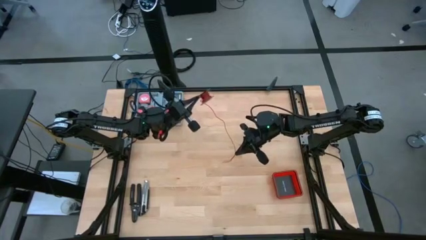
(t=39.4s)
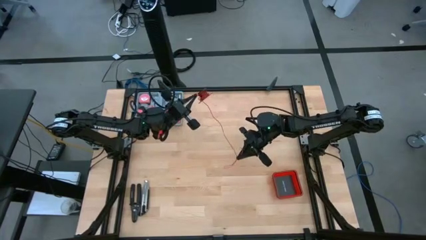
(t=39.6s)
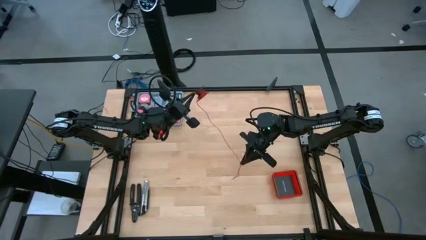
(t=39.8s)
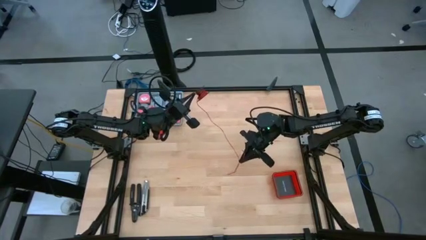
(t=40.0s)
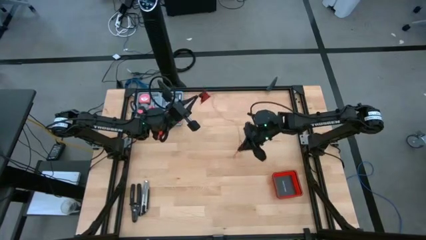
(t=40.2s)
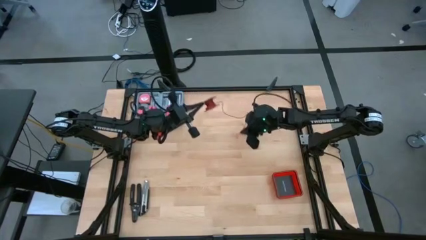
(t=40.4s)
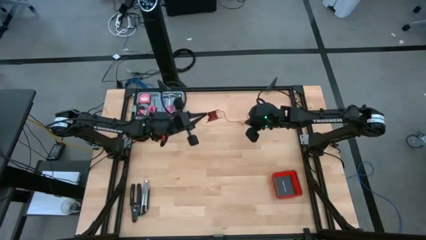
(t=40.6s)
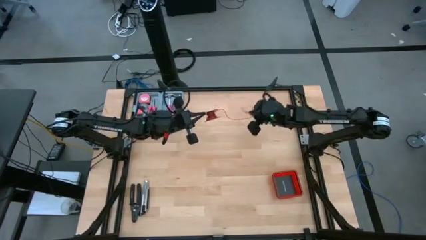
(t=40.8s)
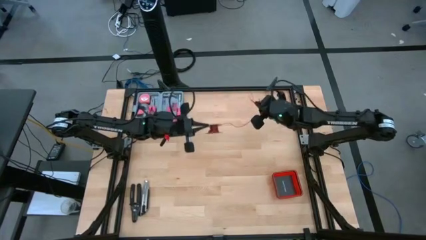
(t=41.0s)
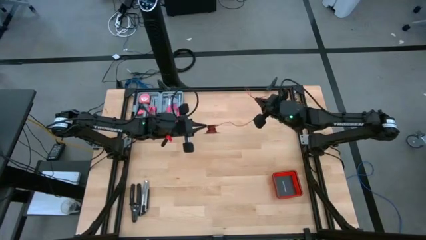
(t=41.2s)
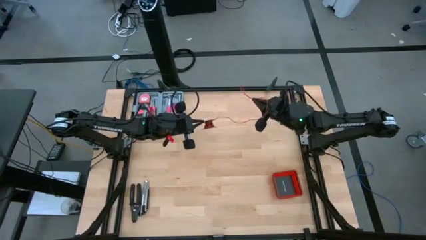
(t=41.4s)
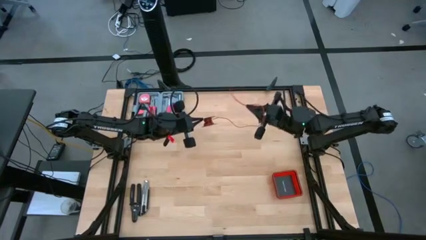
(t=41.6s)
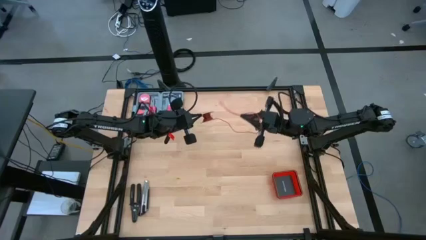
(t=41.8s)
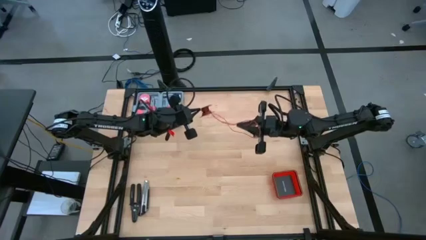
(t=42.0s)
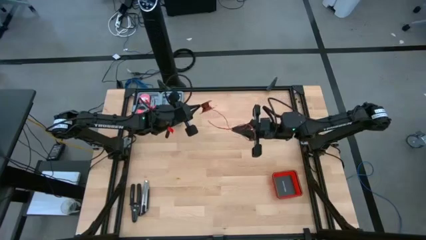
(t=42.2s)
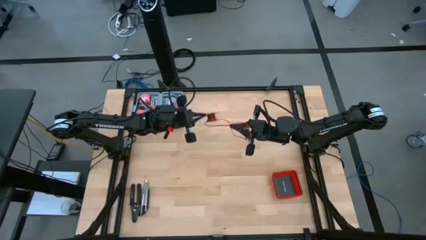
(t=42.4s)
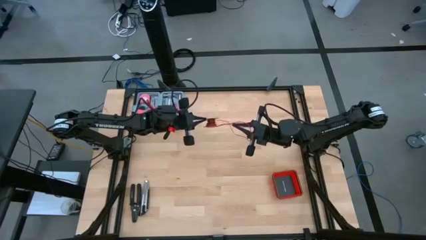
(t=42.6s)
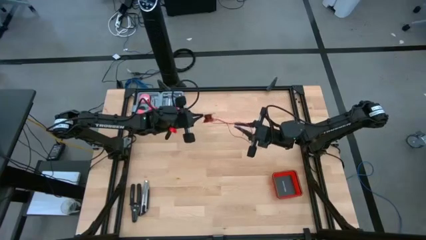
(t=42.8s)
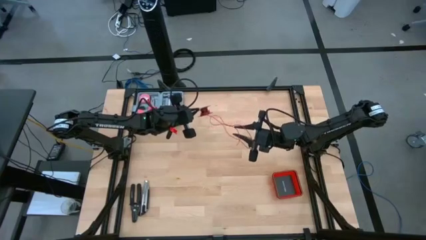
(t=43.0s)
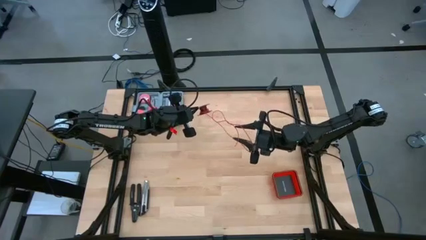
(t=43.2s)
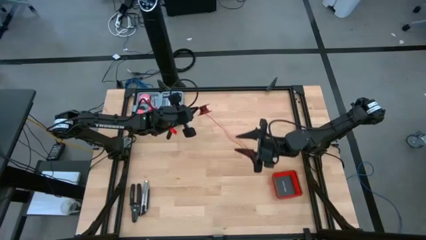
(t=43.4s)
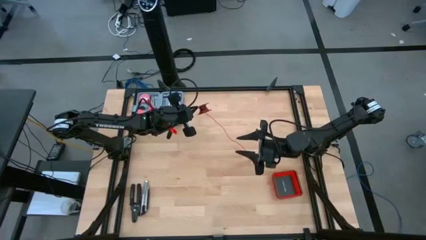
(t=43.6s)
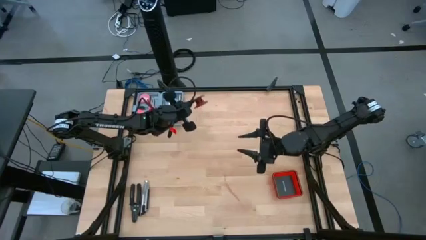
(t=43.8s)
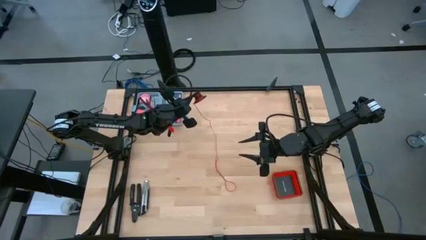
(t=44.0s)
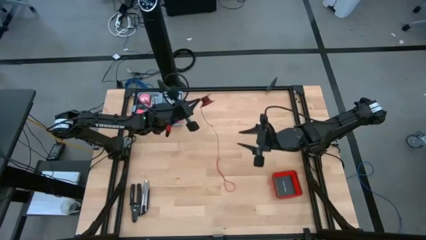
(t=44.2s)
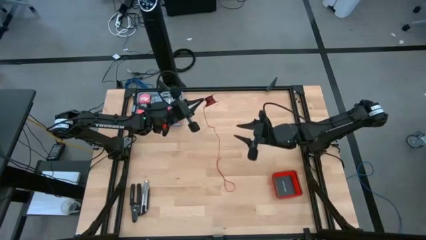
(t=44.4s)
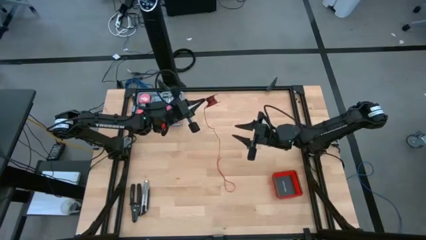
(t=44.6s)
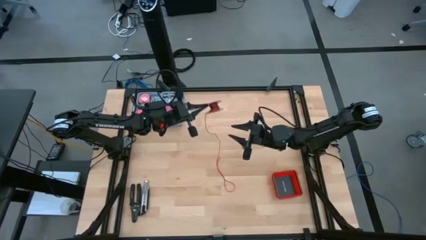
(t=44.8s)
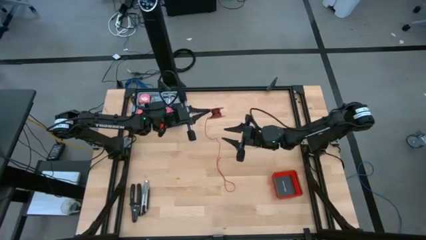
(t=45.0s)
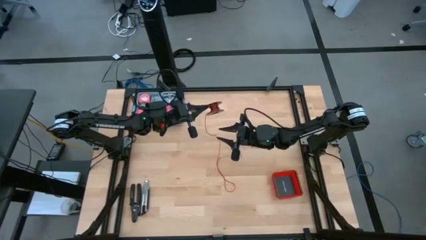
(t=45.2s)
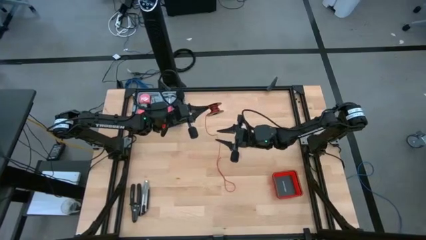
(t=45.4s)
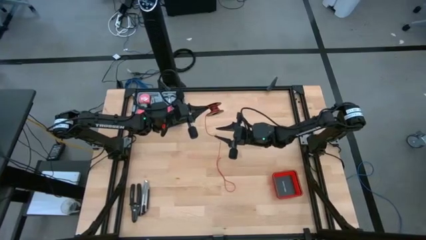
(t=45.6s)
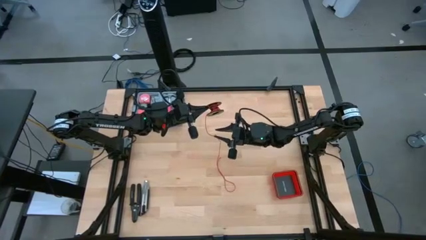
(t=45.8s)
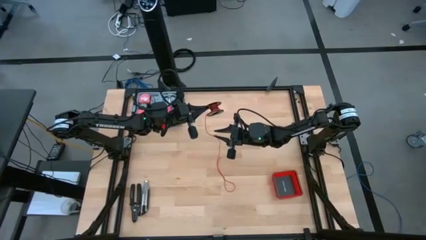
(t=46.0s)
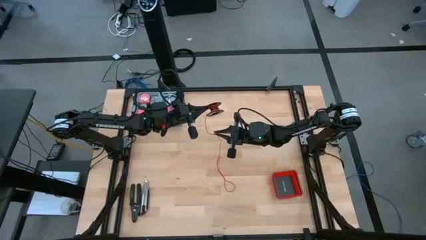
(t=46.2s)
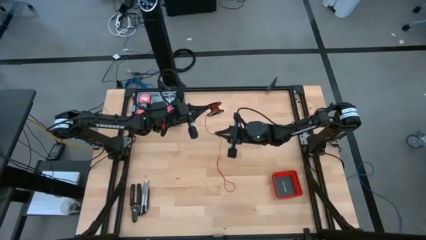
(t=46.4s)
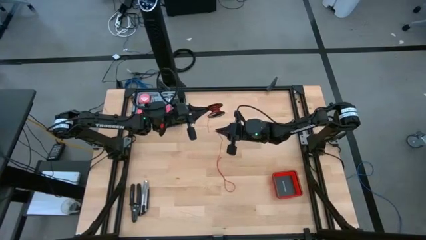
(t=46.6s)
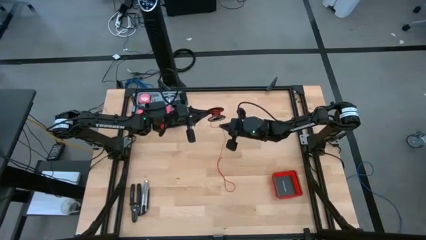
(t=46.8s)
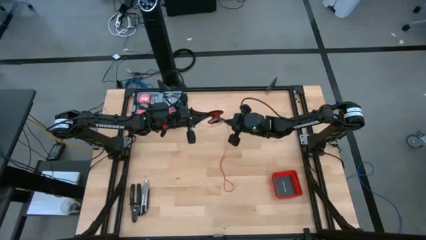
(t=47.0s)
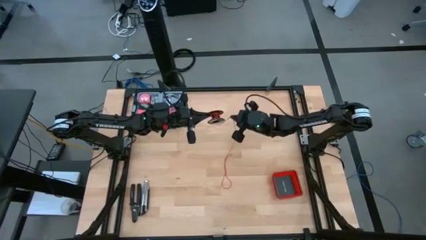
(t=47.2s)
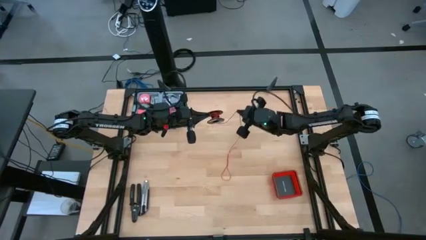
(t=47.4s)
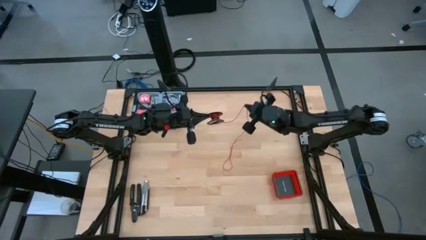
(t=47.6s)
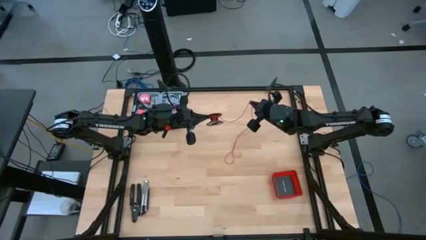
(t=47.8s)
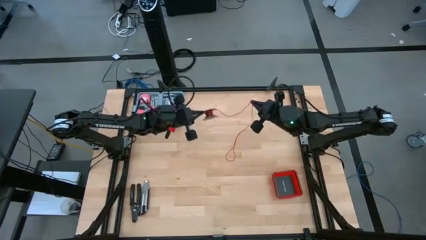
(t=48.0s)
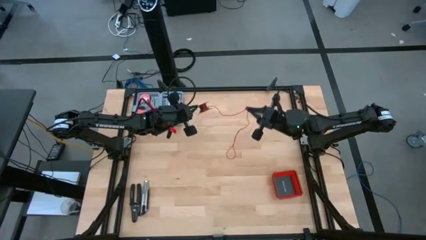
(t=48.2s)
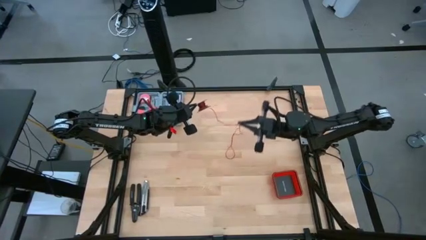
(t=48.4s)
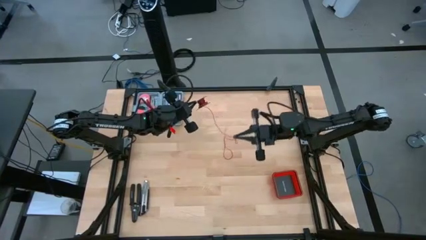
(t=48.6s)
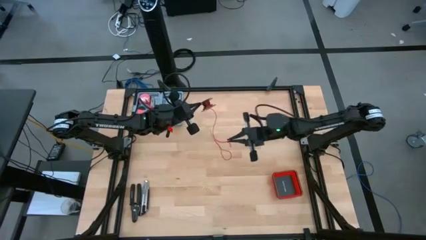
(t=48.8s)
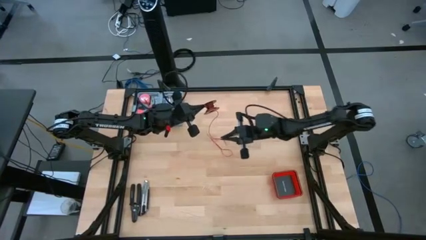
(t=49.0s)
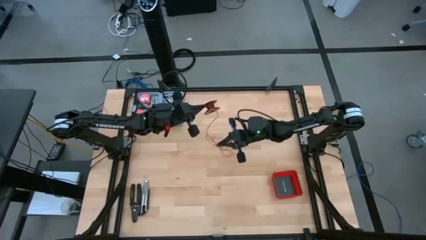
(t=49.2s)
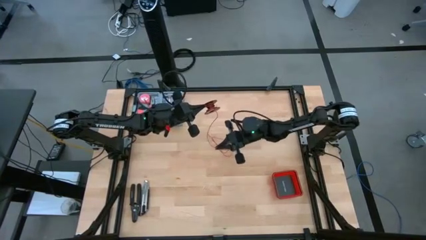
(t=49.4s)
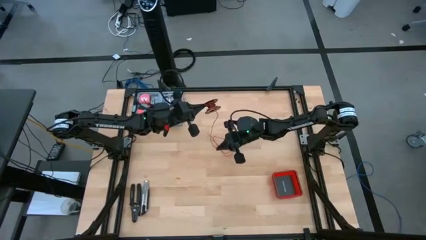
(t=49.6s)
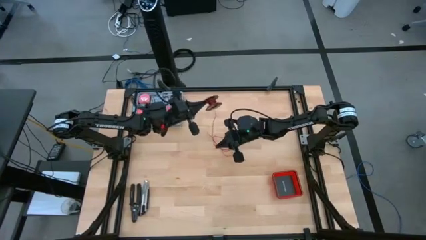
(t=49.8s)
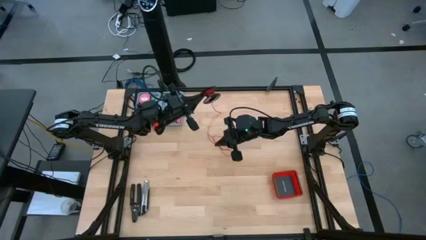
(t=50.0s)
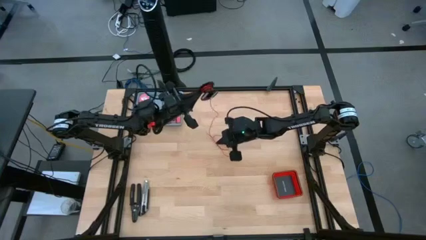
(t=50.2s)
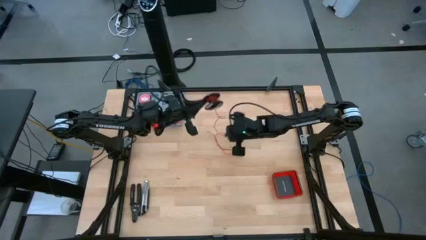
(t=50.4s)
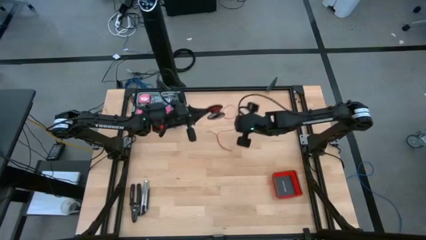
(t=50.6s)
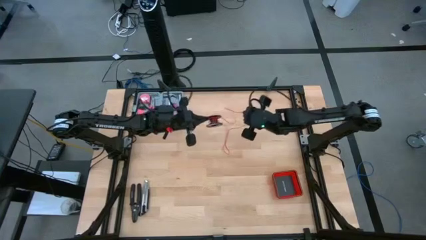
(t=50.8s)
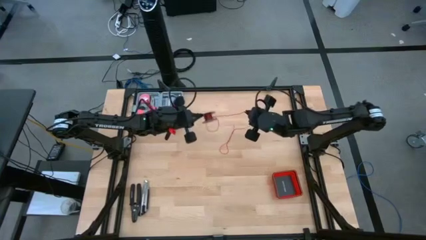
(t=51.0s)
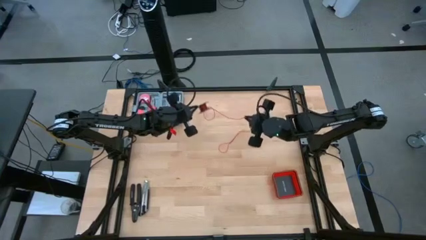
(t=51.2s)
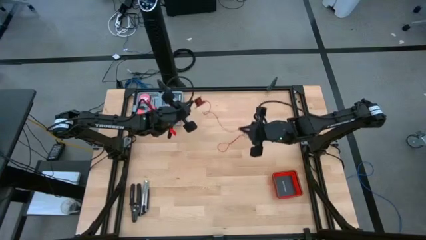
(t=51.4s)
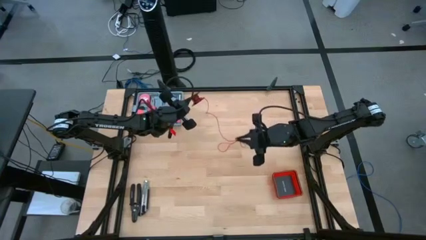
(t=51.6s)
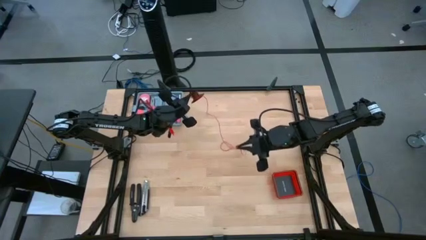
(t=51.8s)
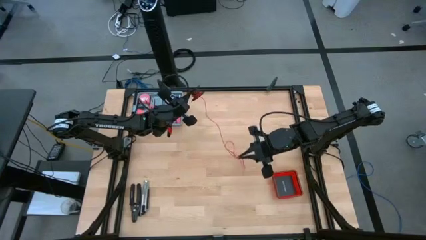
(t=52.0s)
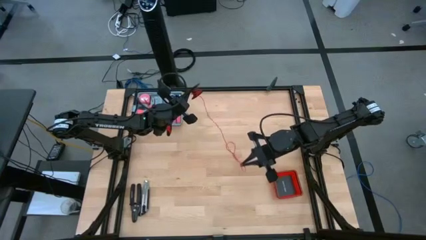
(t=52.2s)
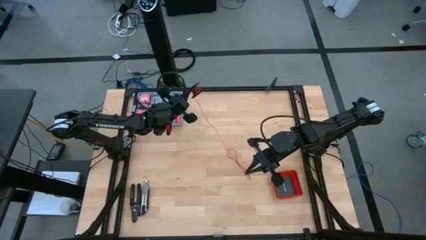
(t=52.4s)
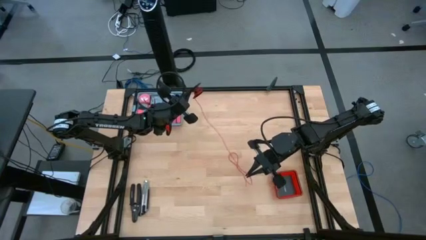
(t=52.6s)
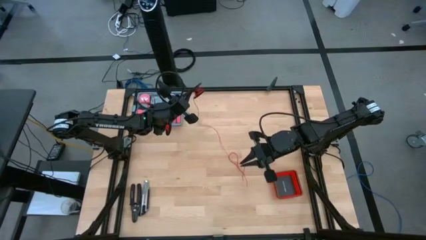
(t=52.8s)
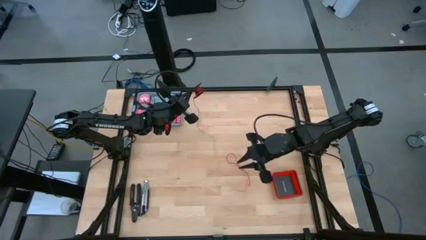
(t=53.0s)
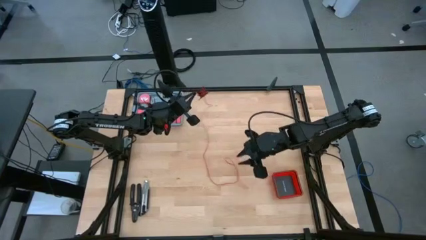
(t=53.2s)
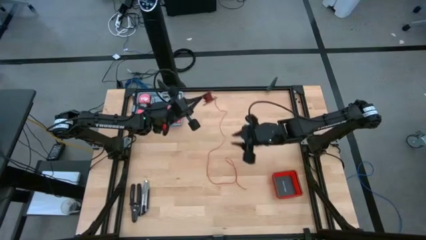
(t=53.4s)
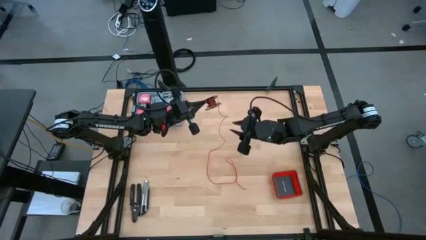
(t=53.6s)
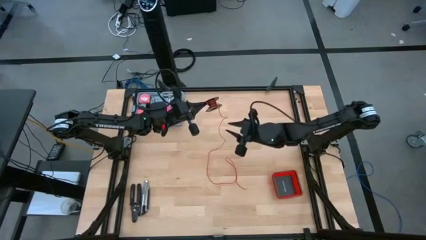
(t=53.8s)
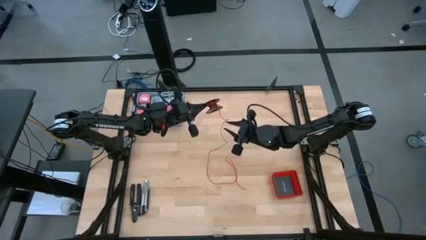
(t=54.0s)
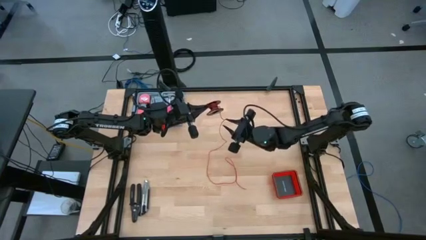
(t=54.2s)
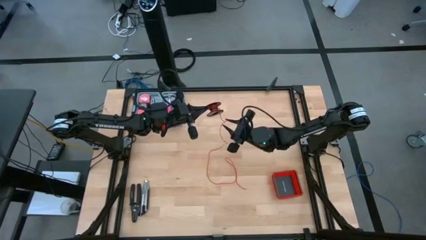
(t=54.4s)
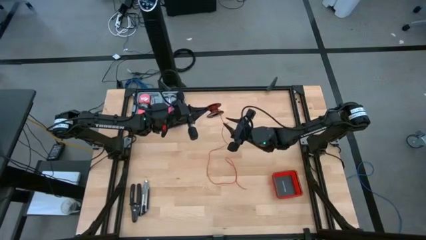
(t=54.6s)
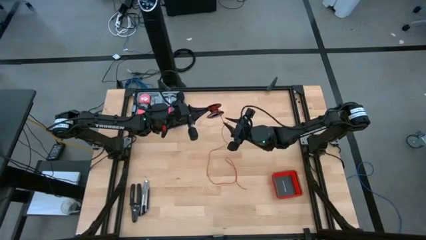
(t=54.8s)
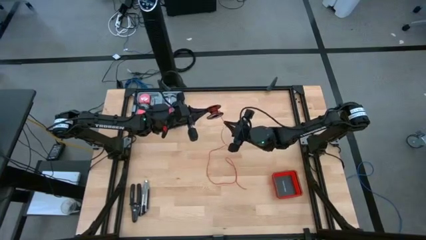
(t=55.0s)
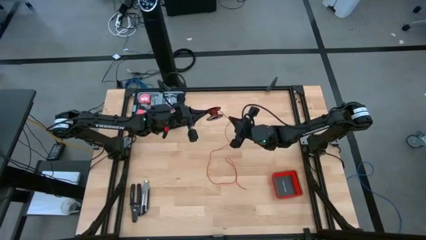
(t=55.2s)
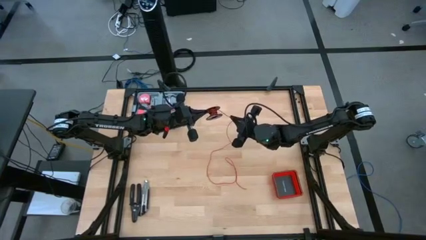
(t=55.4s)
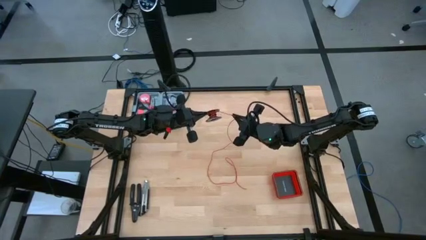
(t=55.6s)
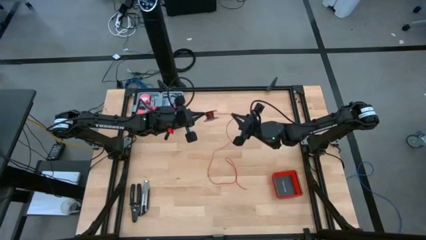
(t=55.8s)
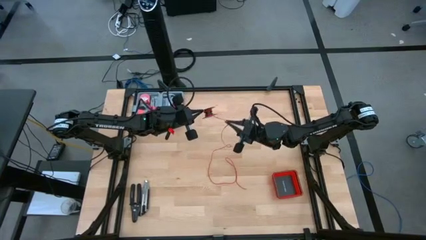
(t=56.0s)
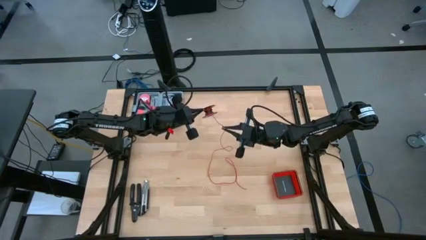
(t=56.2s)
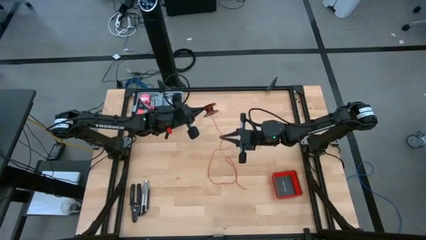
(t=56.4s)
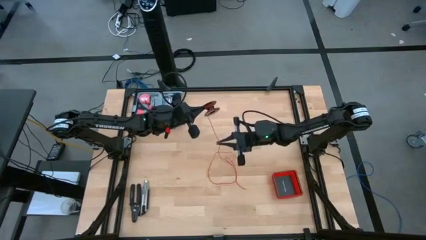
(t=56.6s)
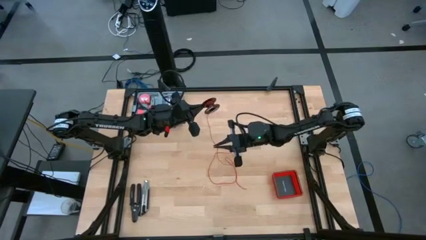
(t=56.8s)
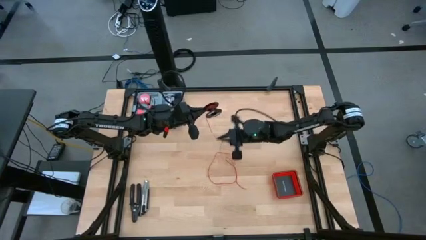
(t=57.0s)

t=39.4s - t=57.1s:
Task: Coil cords
Uncoil the red wire from the spool
